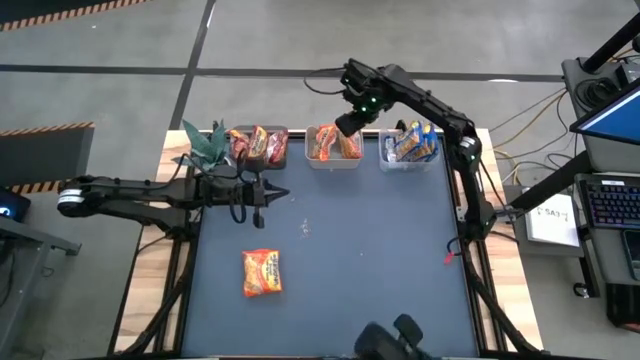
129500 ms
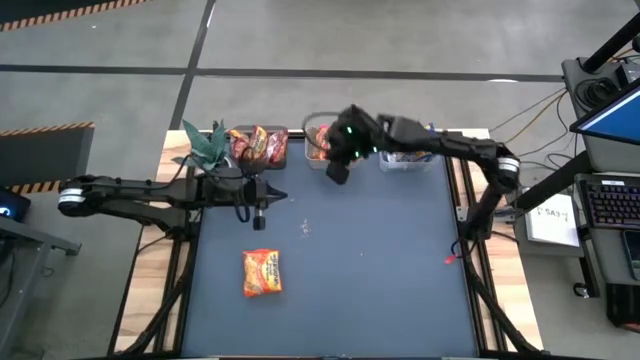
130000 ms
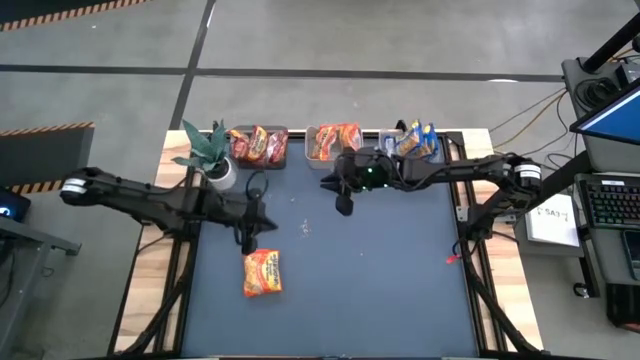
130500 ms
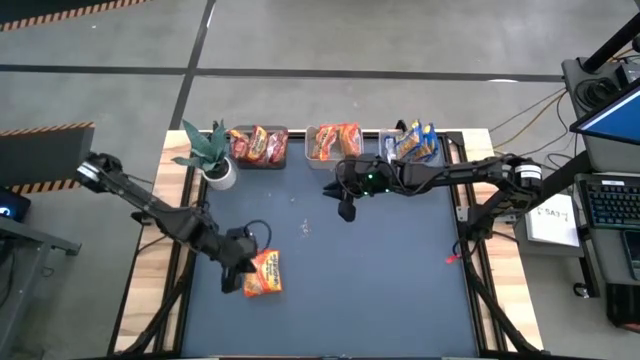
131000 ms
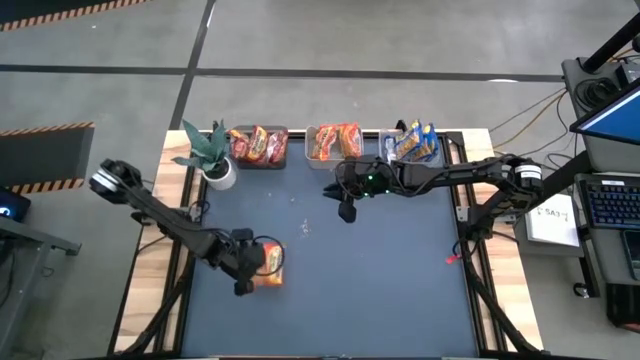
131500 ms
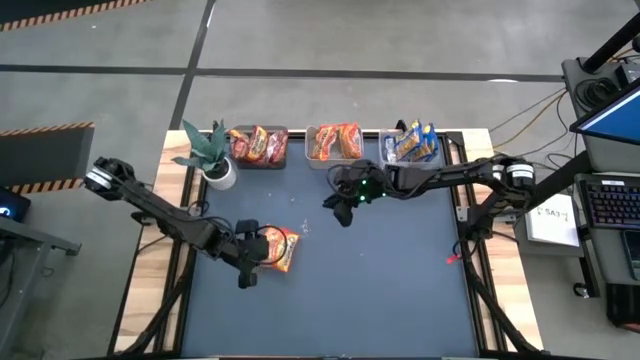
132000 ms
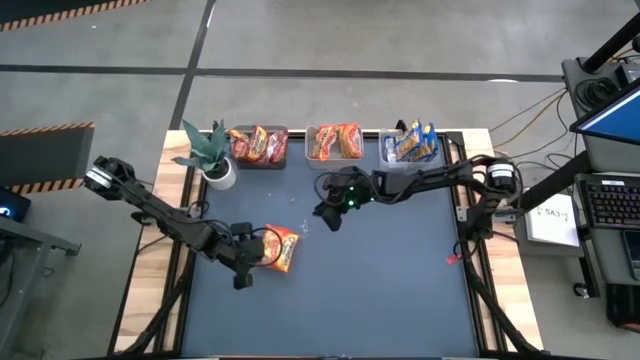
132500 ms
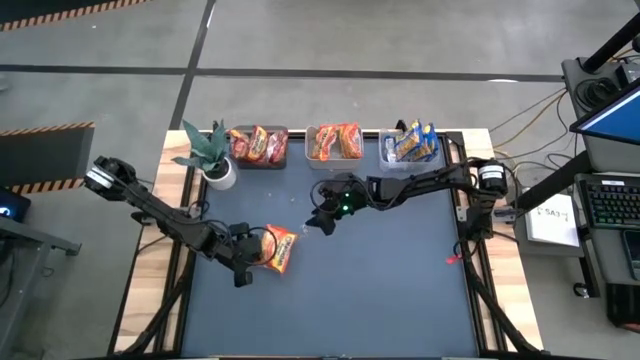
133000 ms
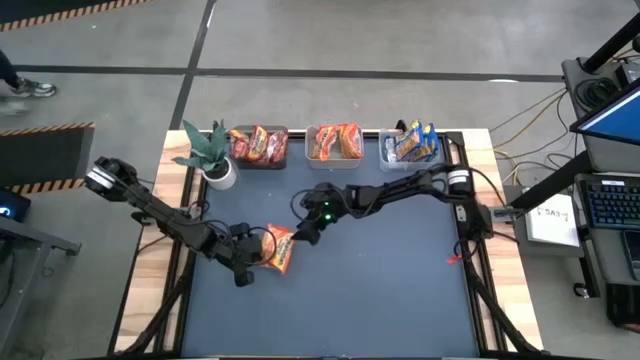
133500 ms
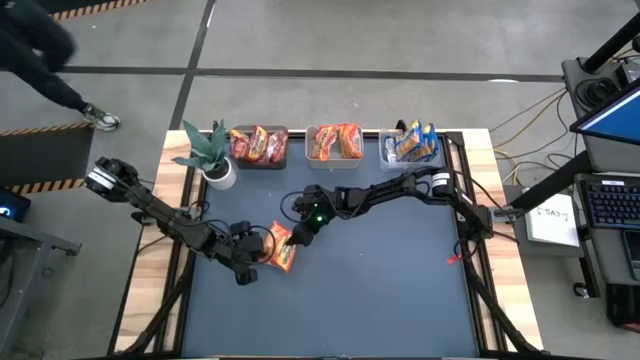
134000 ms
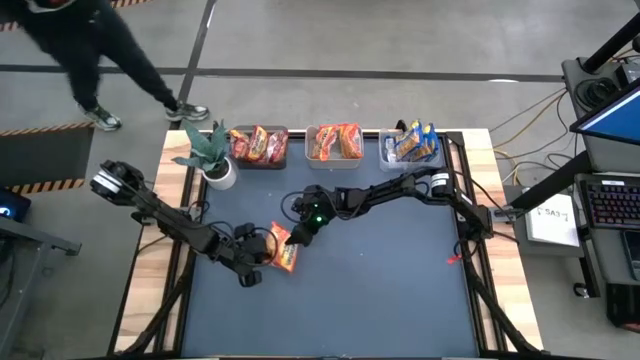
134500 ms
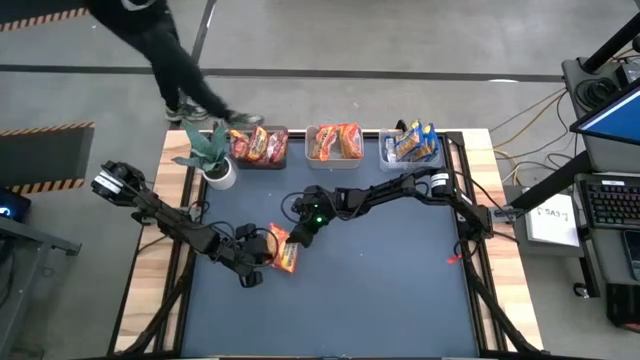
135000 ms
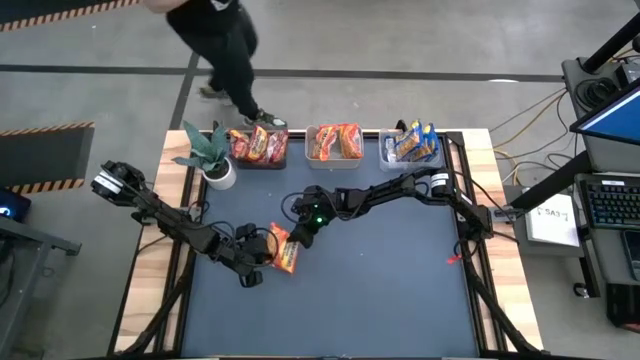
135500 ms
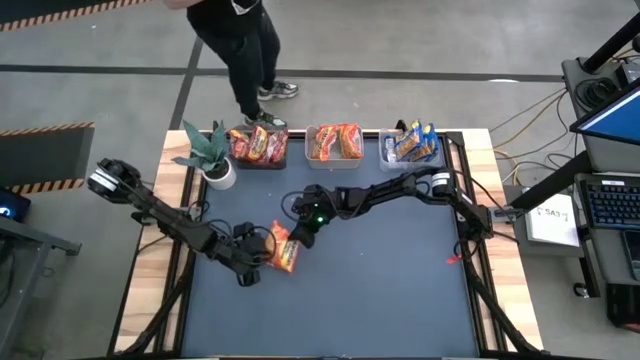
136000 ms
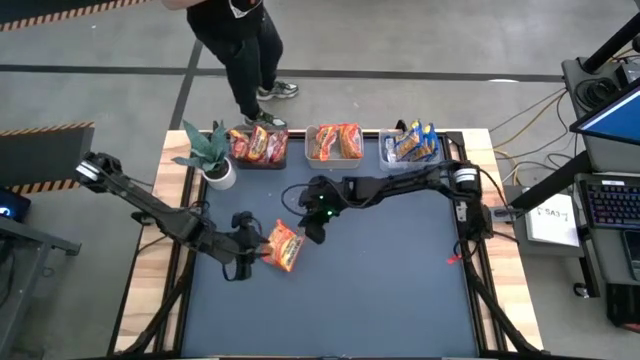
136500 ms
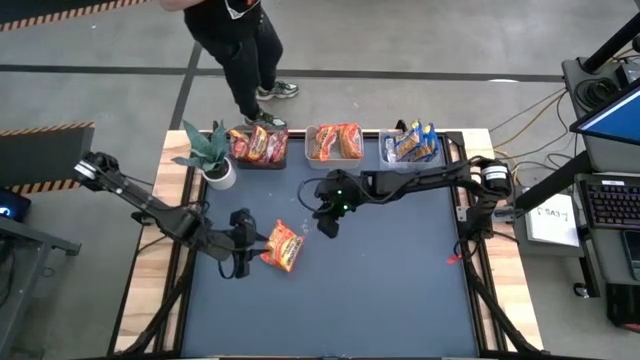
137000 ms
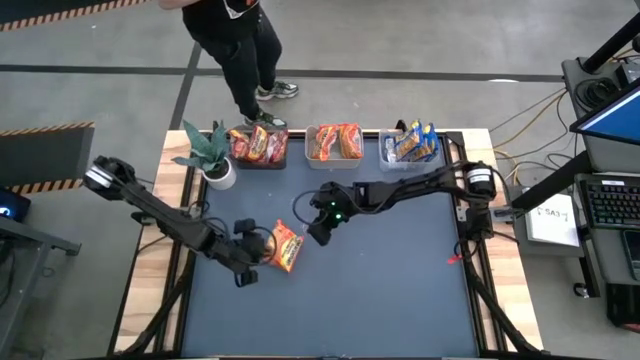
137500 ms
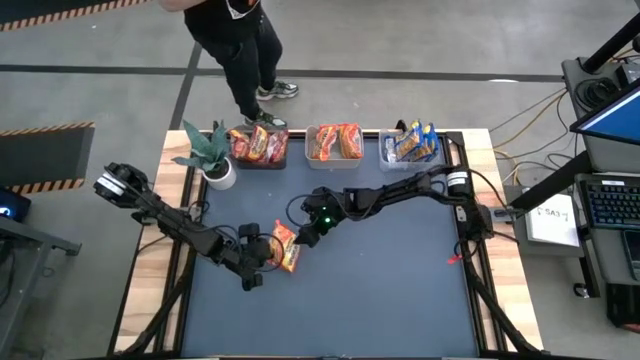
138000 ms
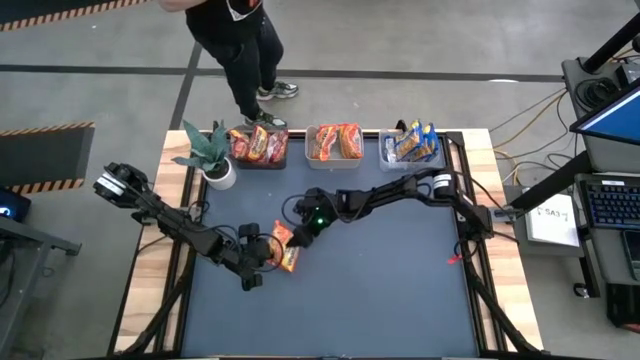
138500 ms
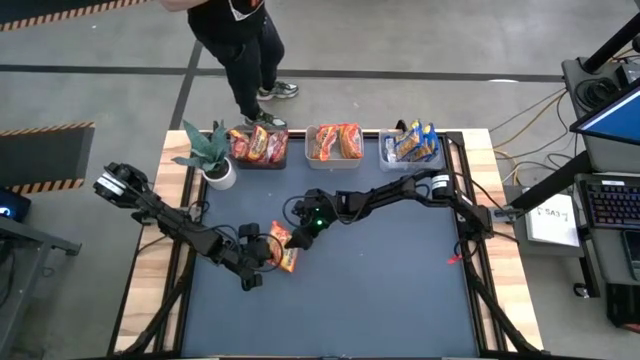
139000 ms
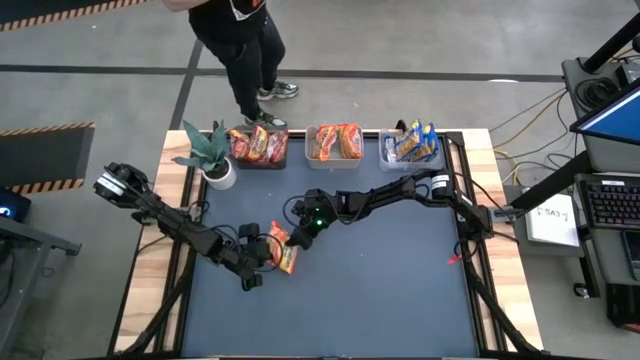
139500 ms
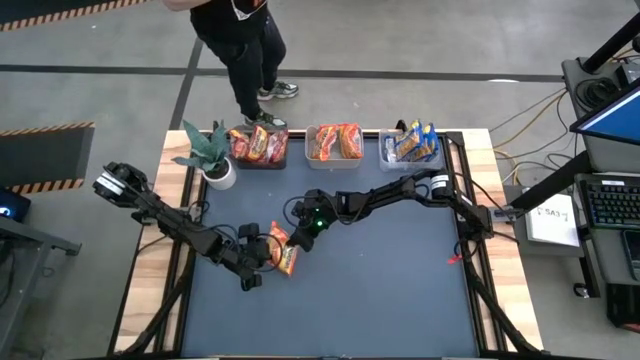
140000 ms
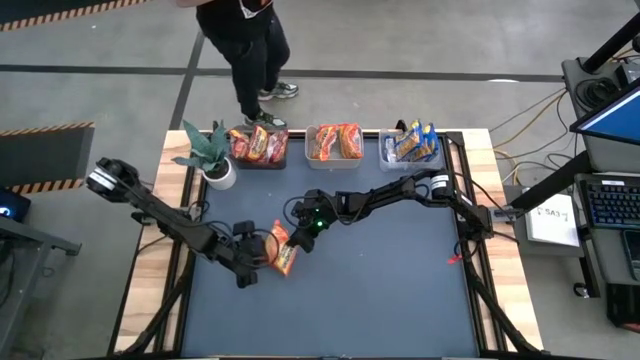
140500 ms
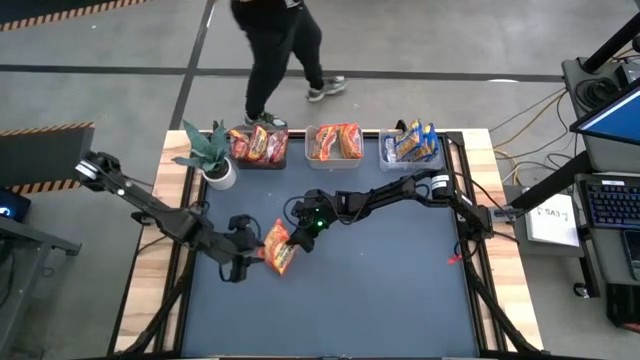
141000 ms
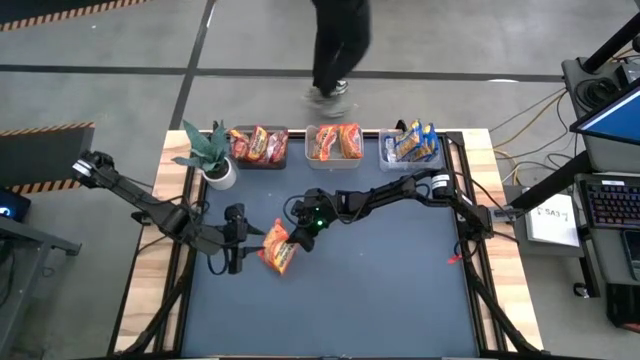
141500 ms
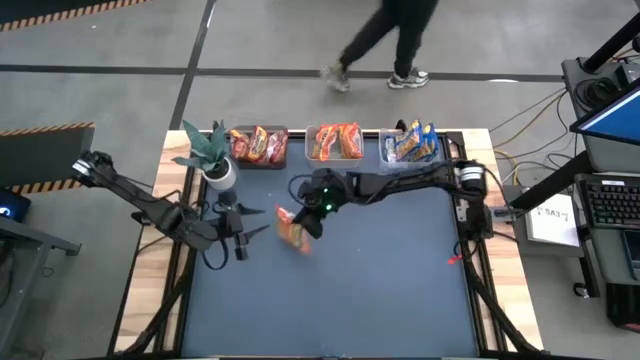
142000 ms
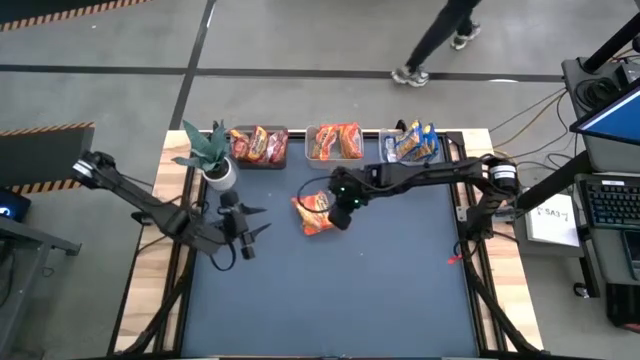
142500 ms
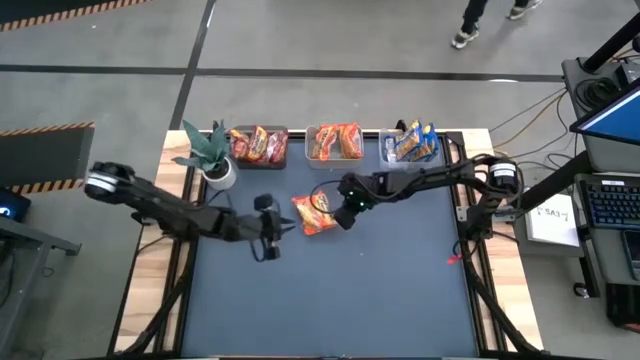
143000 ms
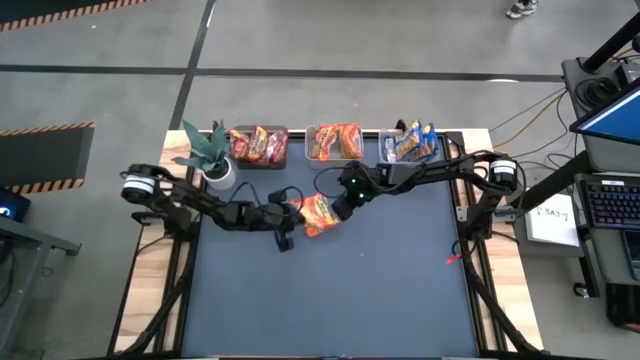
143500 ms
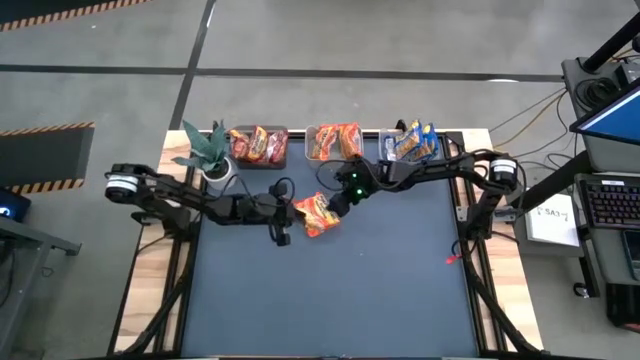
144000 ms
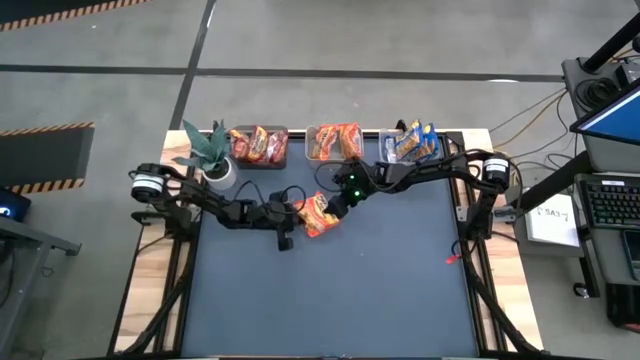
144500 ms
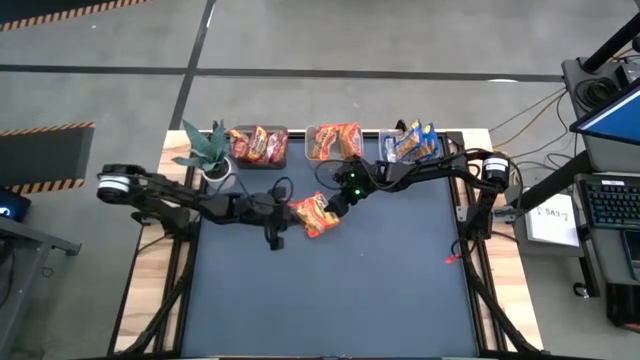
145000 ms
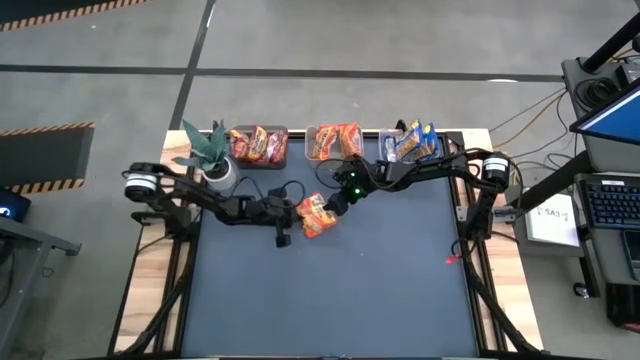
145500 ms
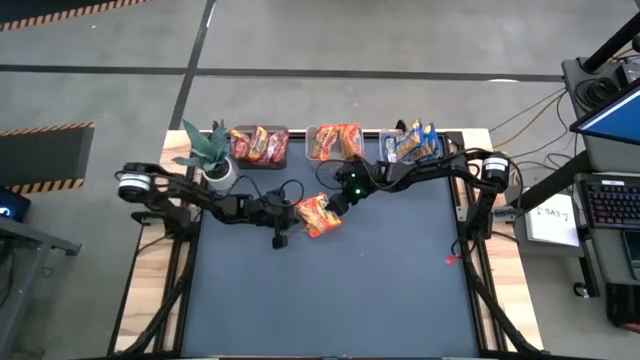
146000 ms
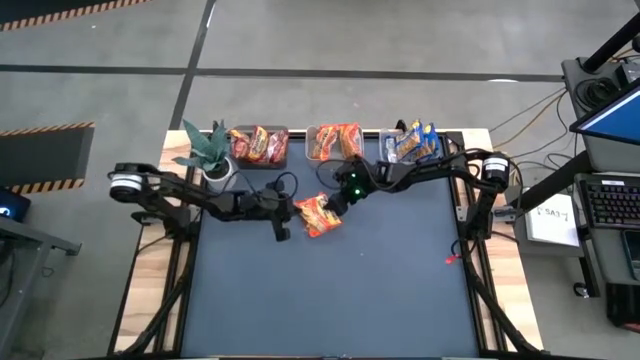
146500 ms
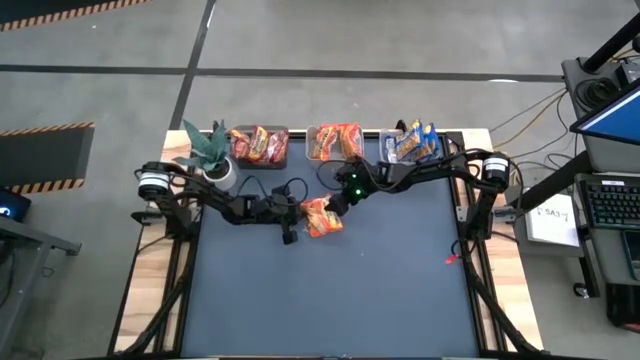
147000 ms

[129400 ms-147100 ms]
Task: Sort Maruchan noodles
Put the orange noodle pack into the white bin

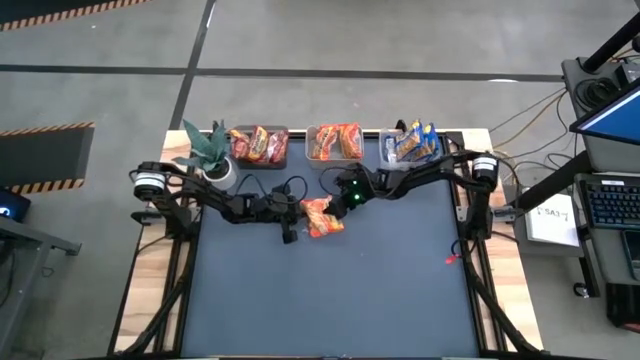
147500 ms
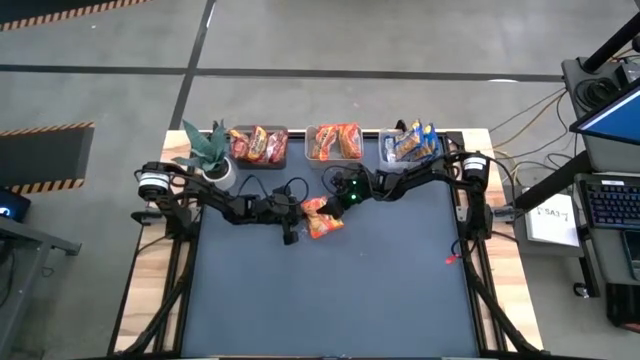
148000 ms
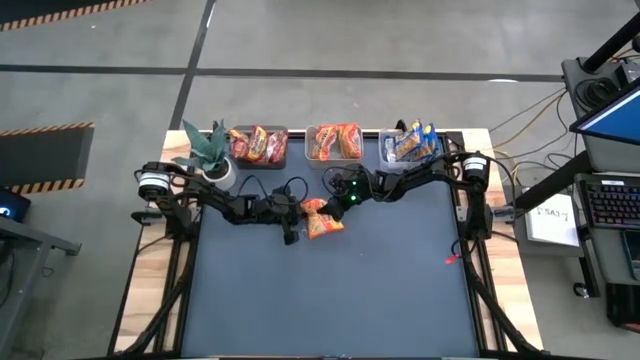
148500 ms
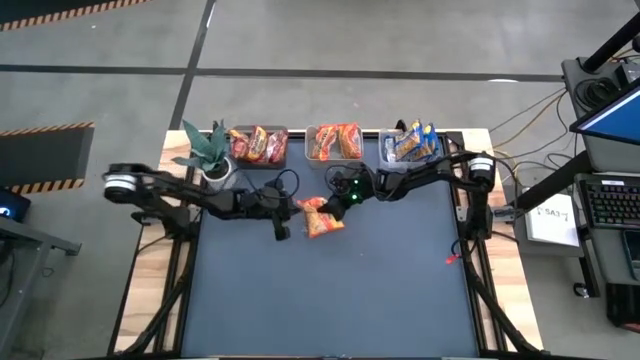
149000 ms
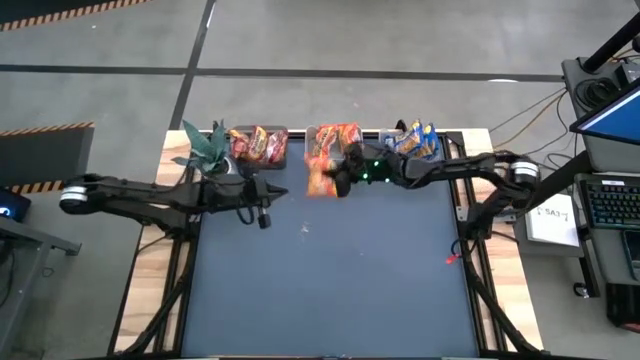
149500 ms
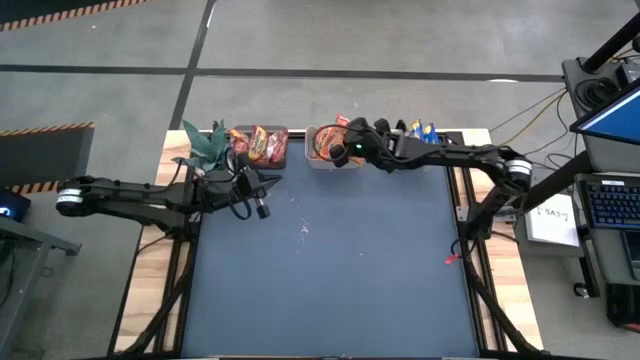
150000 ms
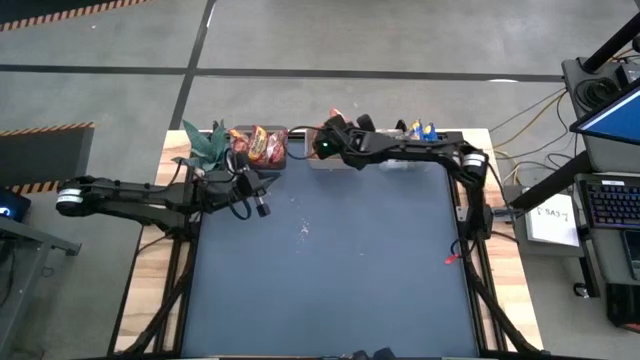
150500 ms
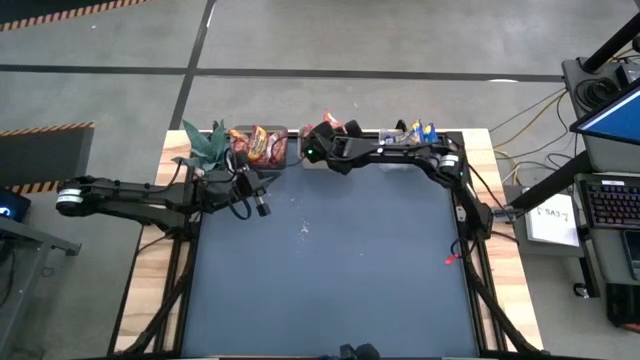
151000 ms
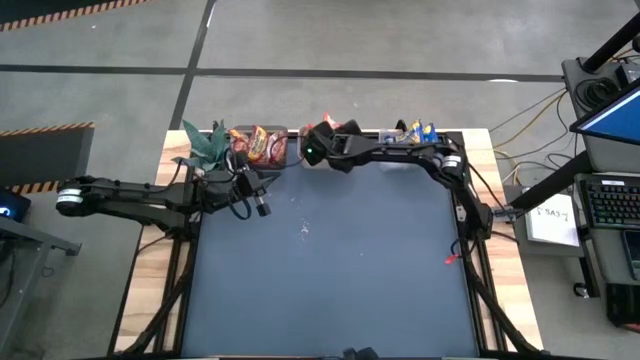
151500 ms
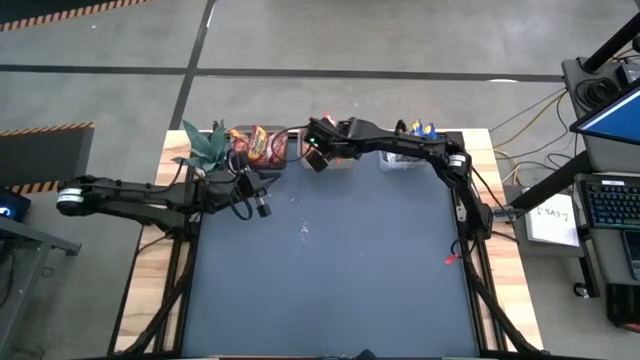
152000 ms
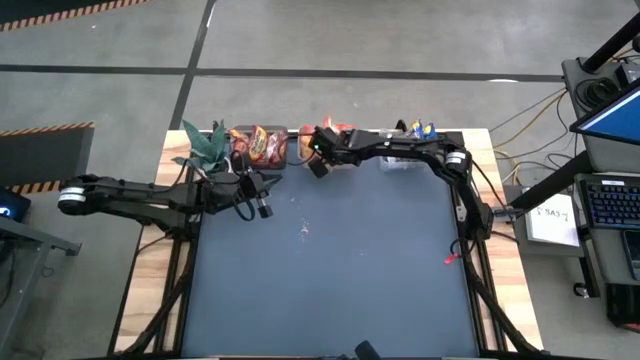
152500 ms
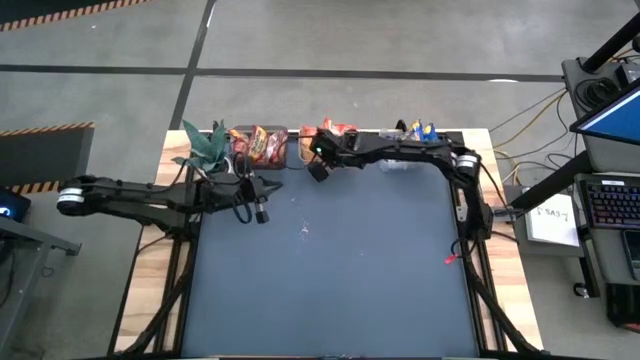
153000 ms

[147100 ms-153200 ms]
Put the orange noodle pack into the white bin
